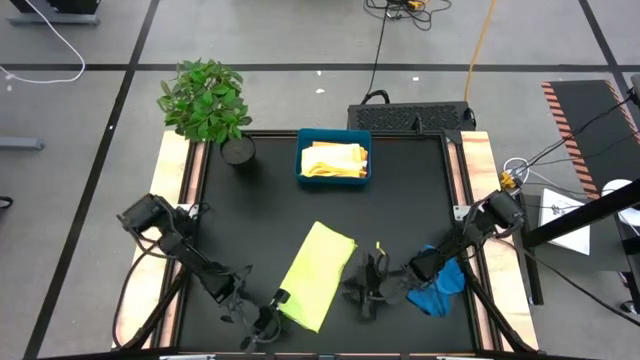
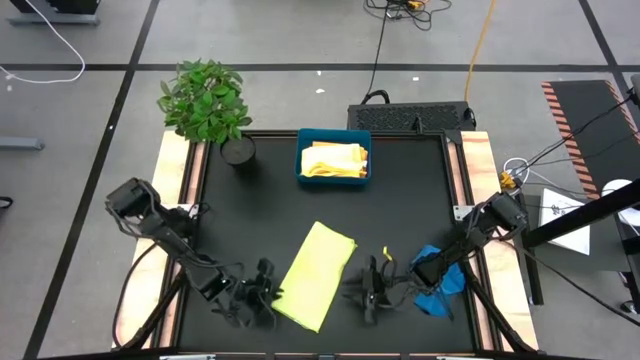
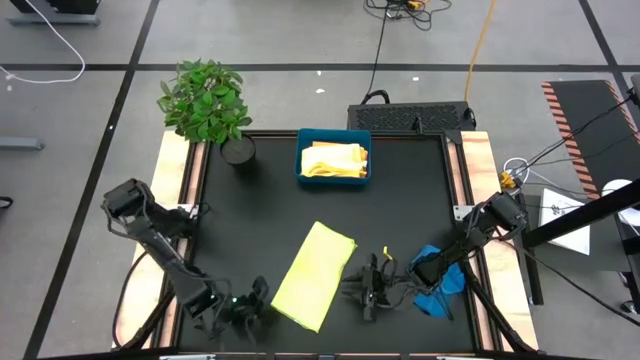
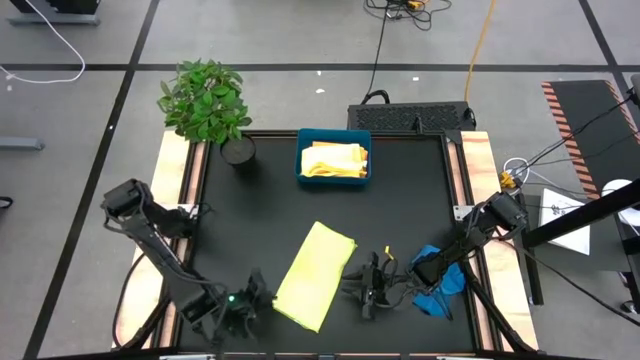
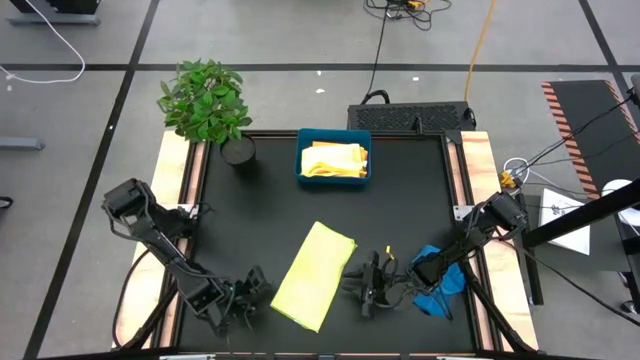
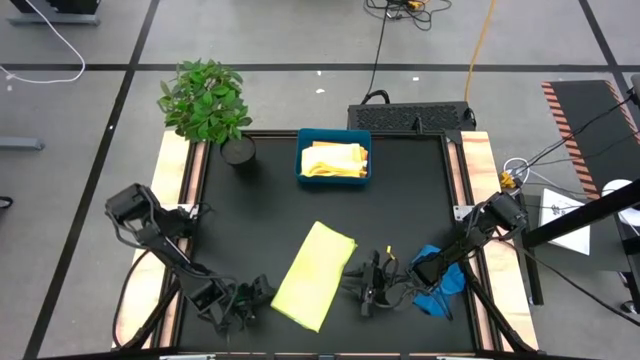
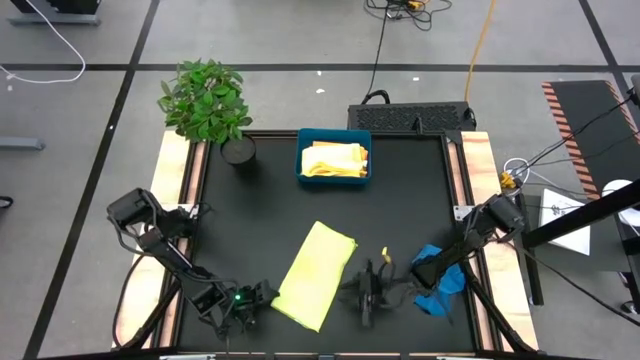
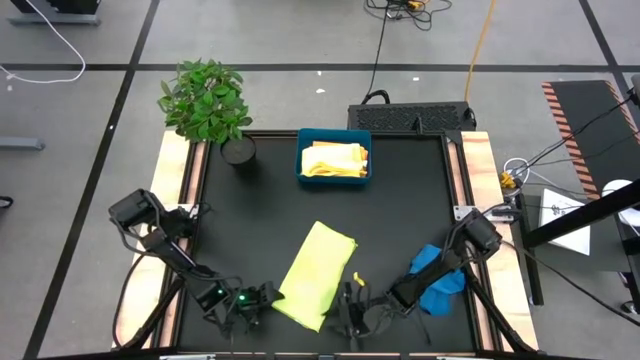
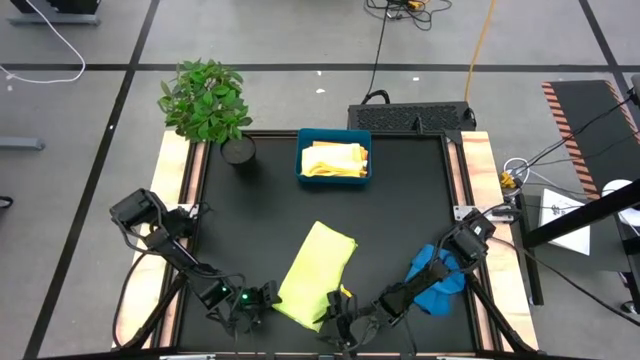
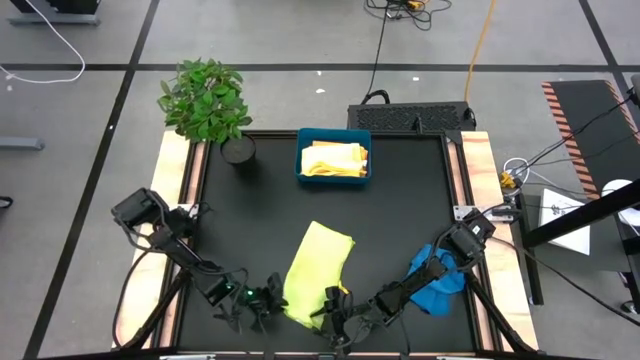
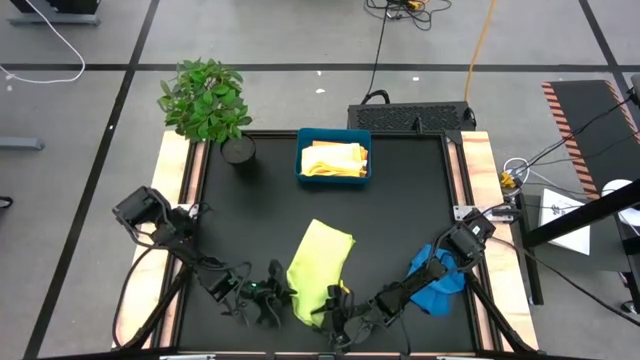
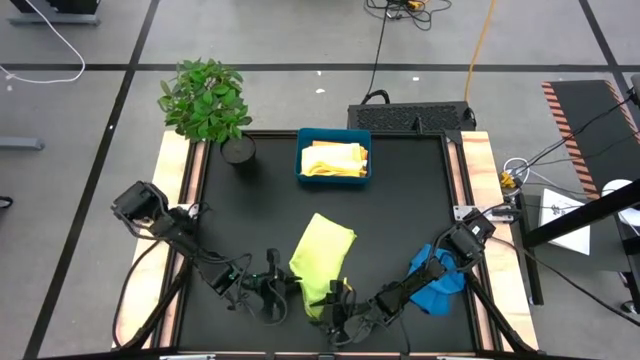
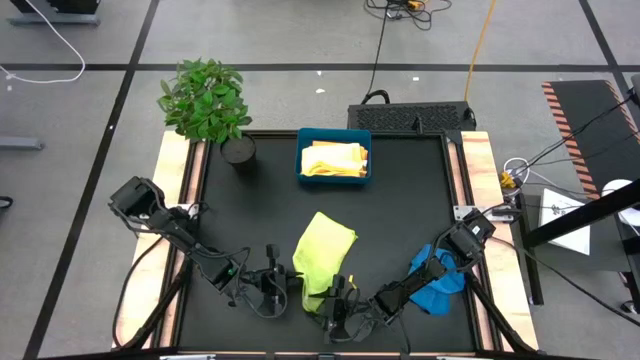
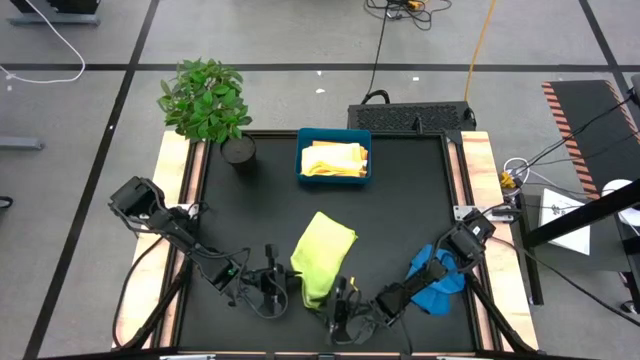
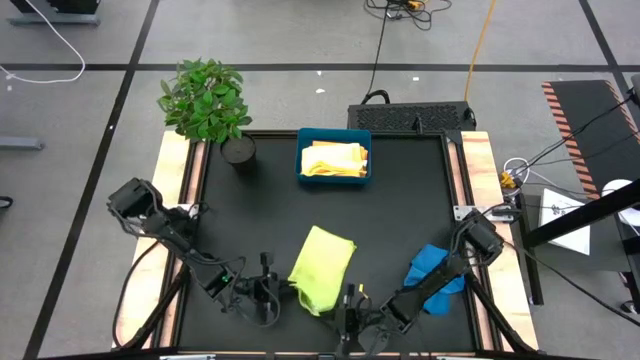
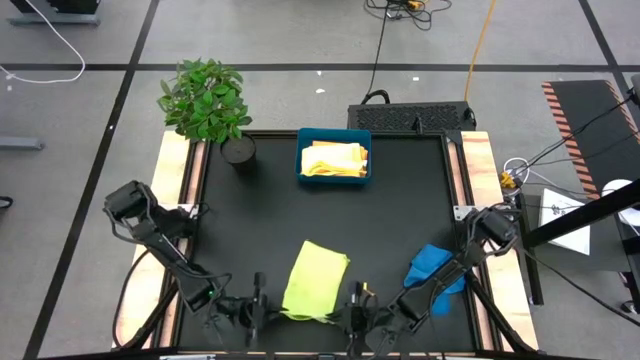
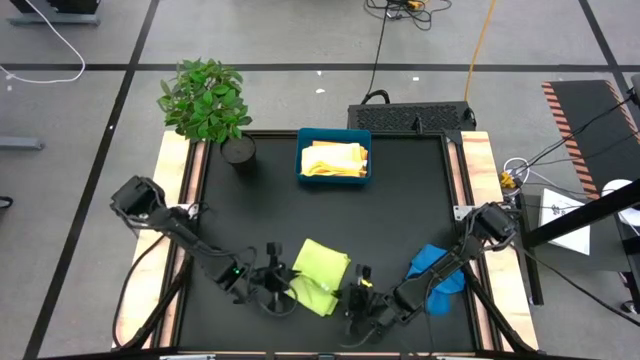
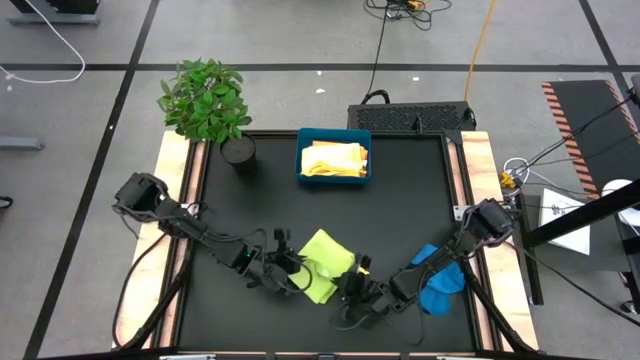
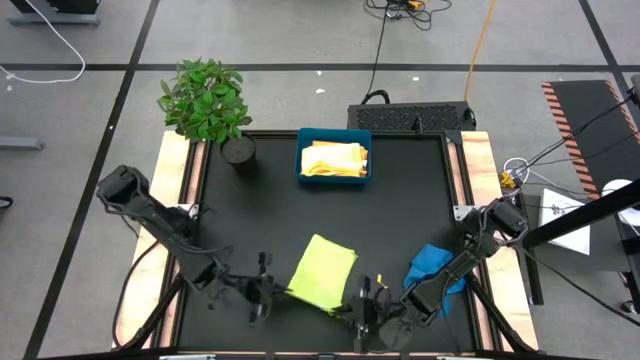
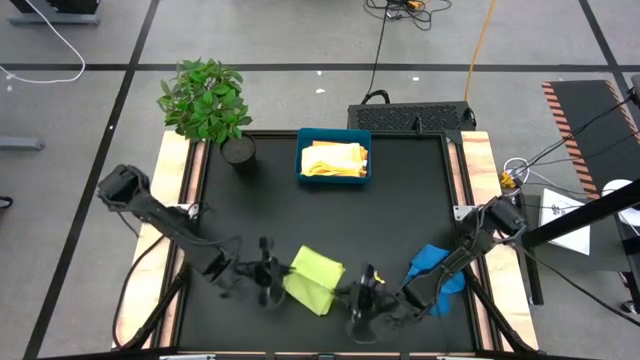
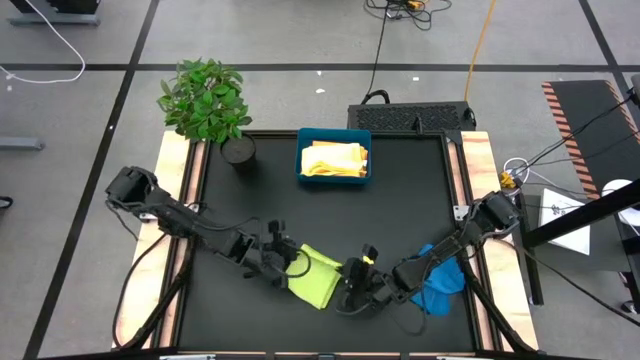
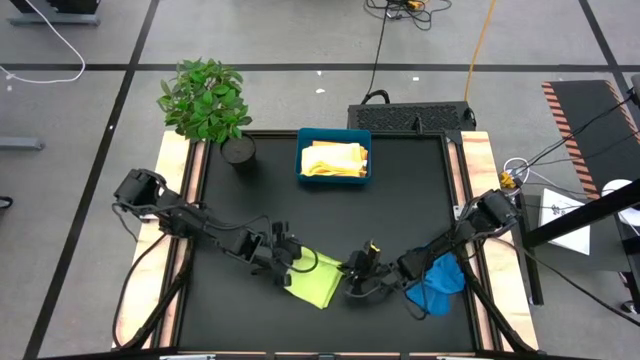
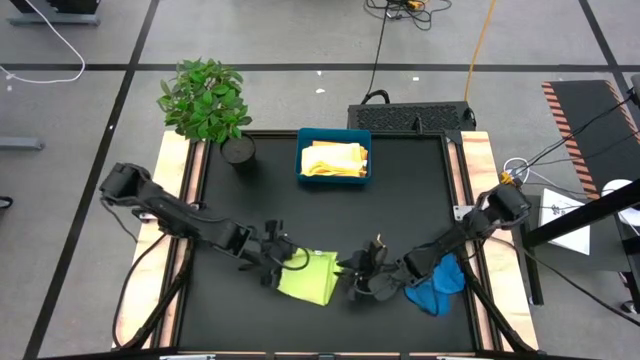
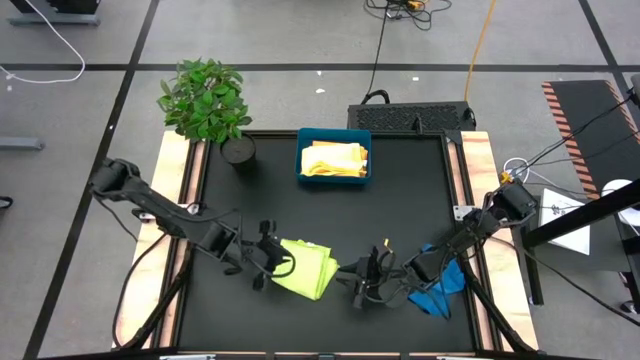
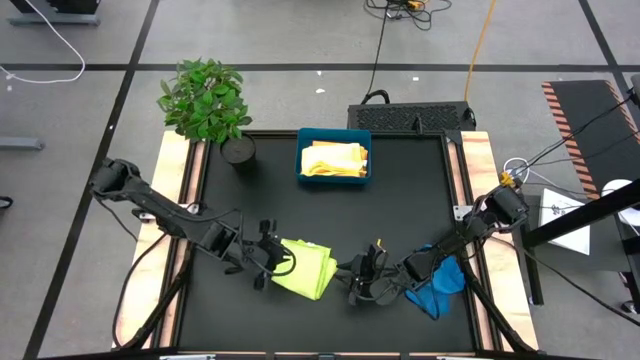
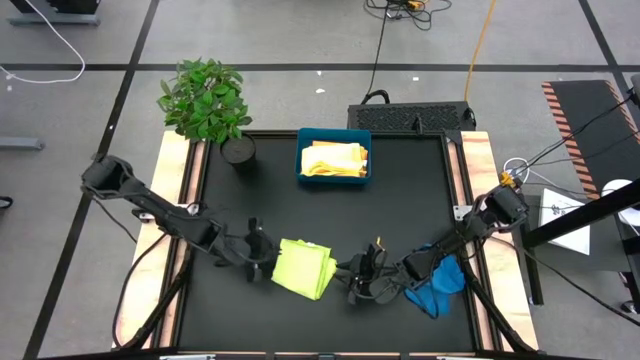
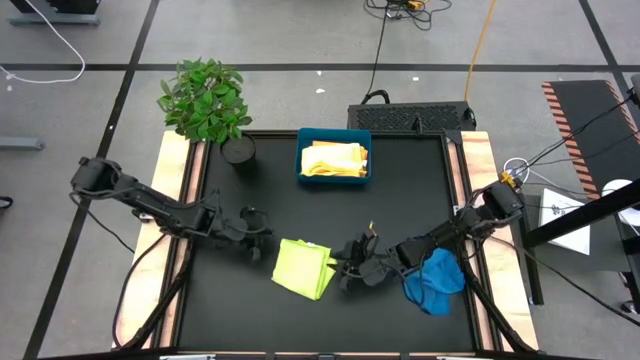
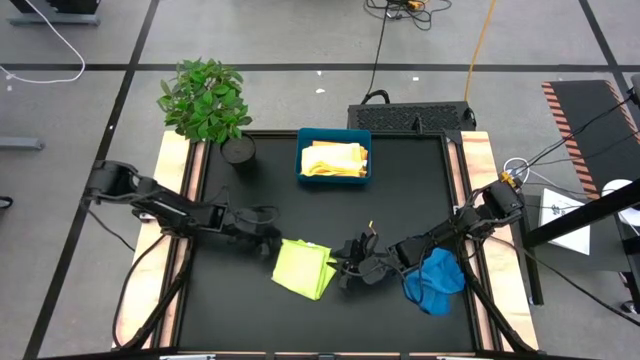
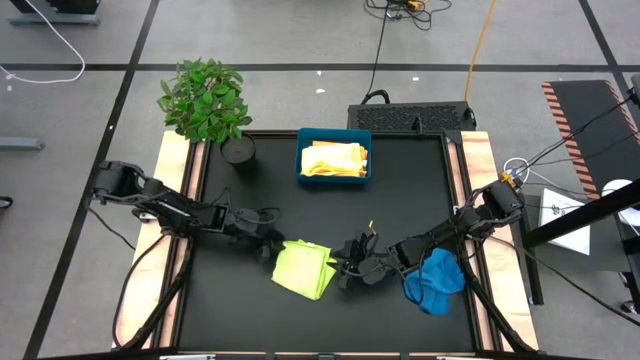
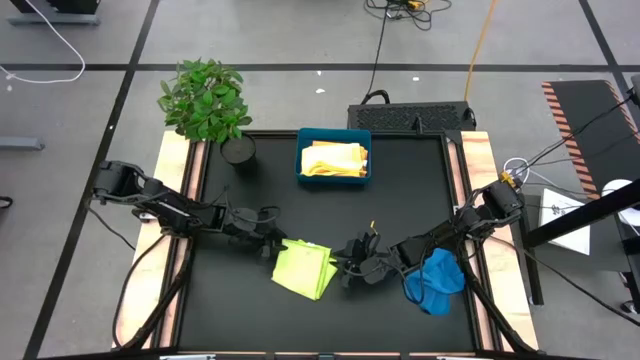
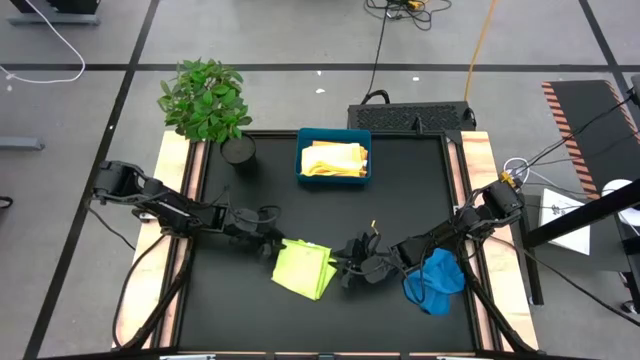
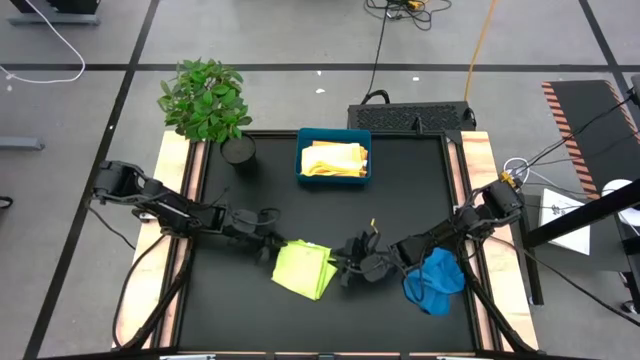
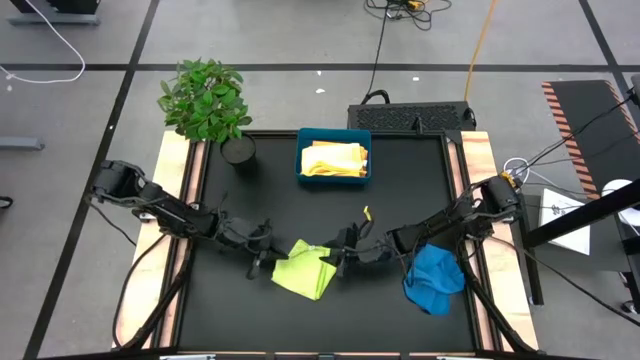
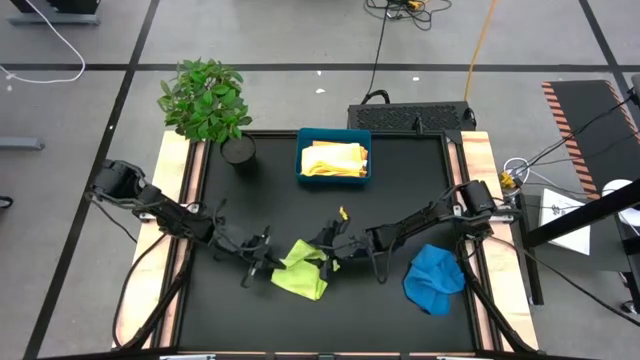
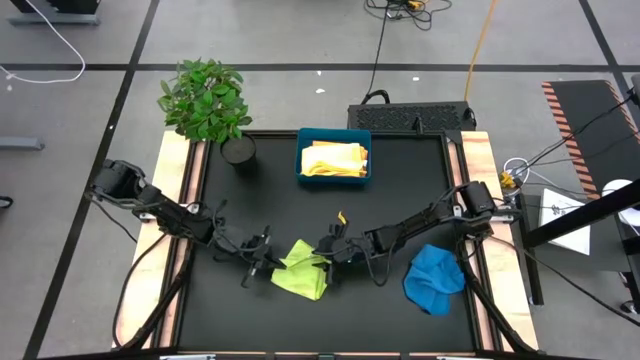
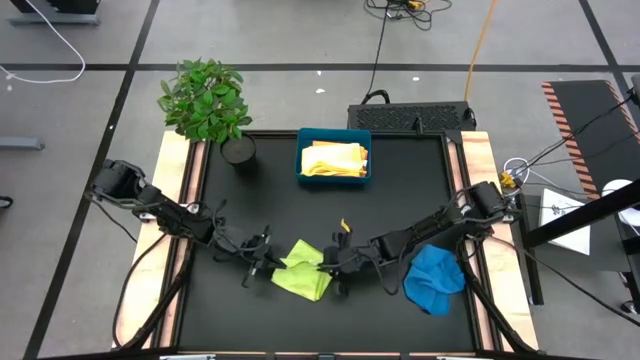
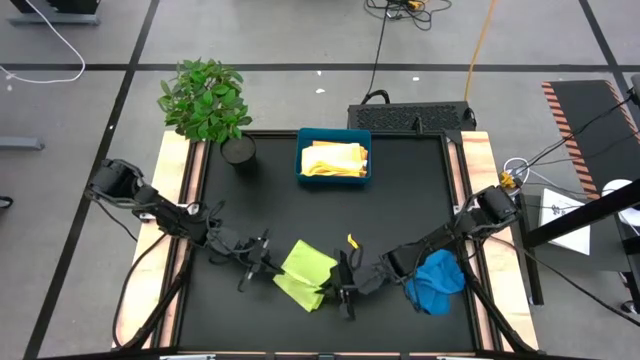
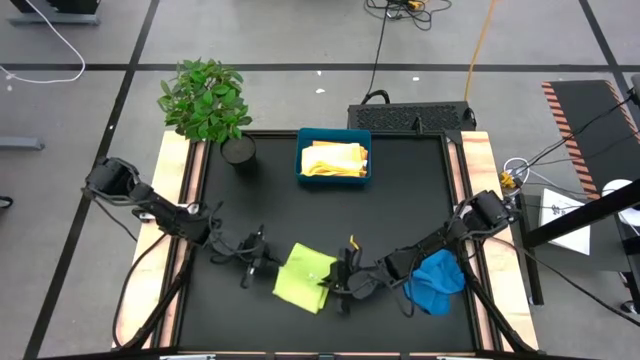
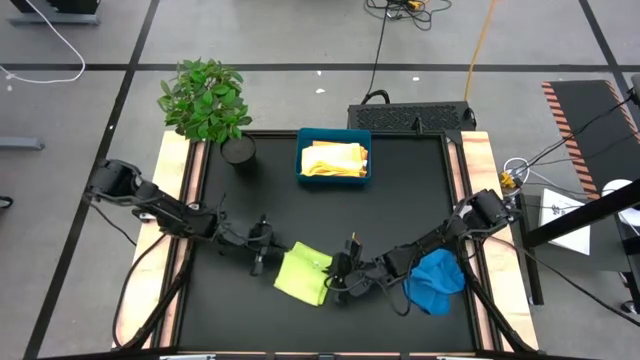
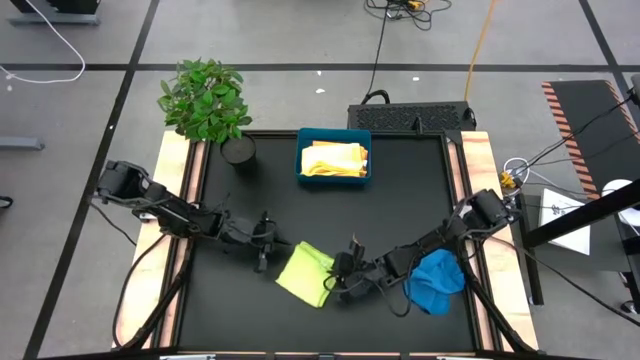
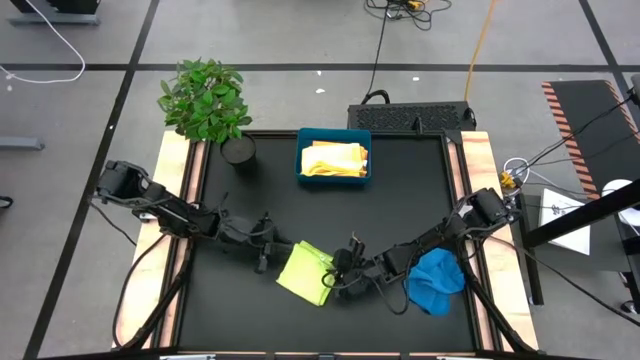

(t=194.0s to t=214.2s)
Task: Fold microfiber towels
Fold the green microfiber towel

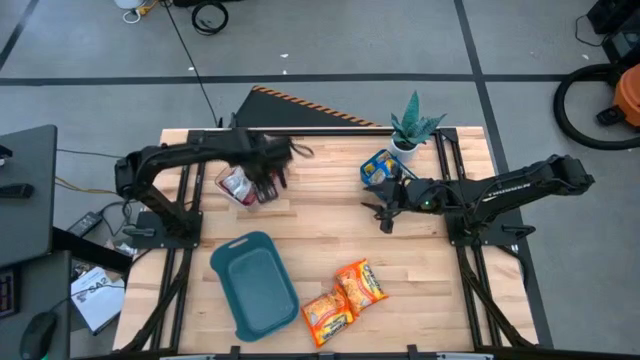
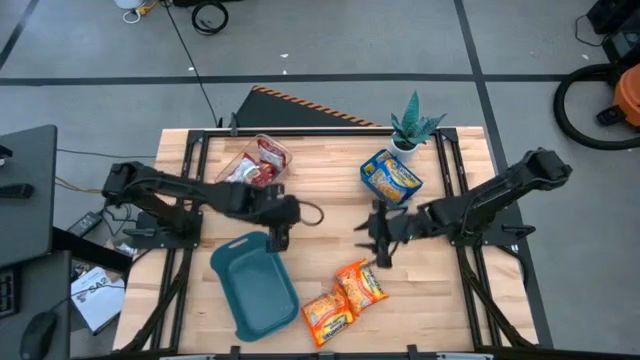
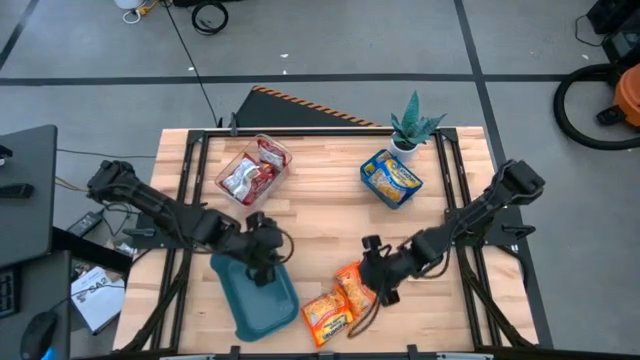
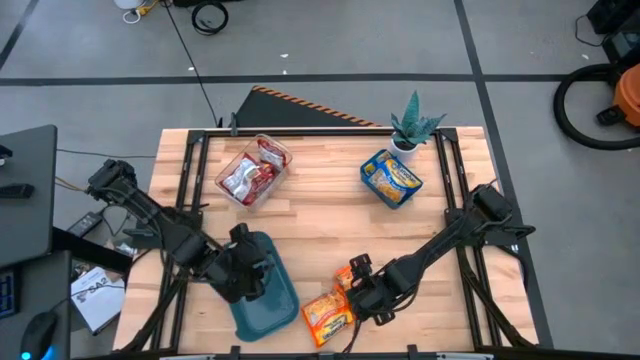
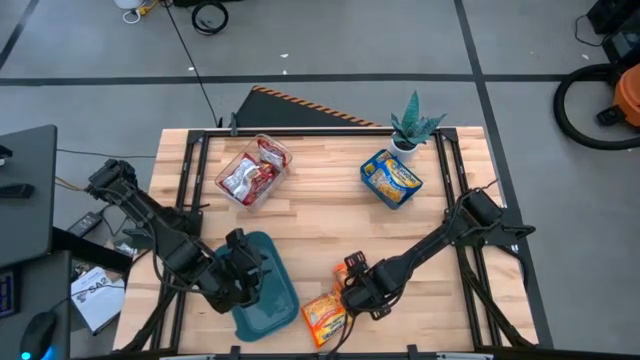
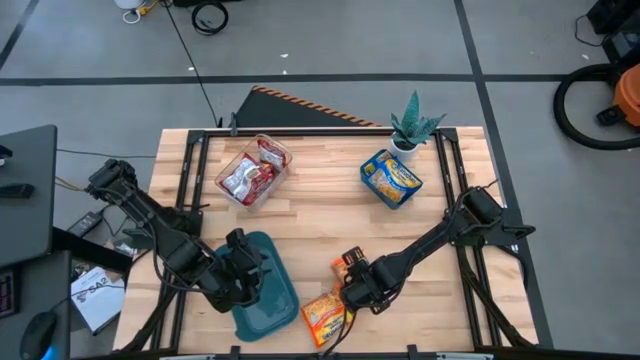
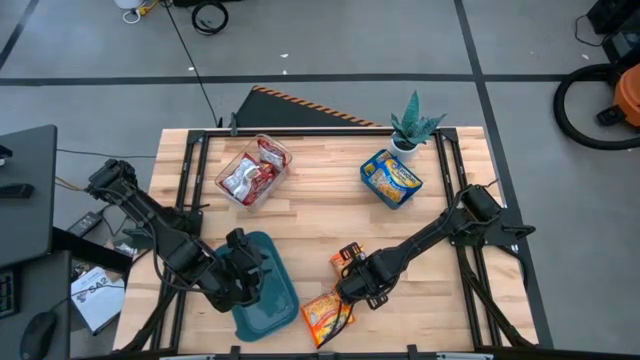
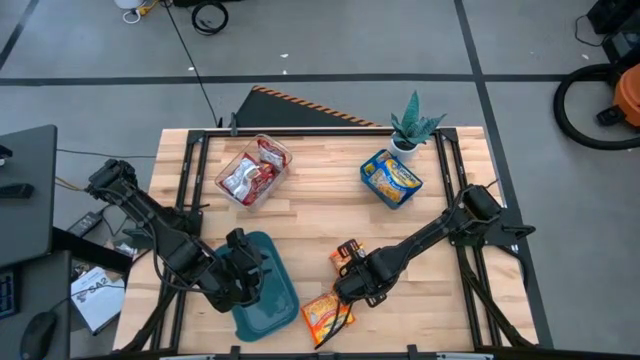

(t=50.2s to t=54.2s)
Task: Sort Maruchan noodles
Put the orange noodle pack into the dark blue bin
